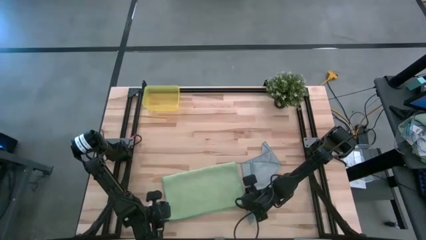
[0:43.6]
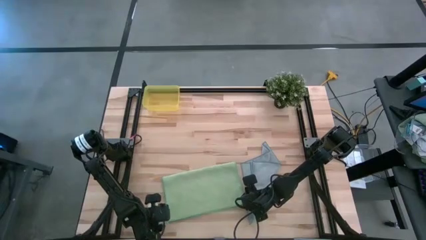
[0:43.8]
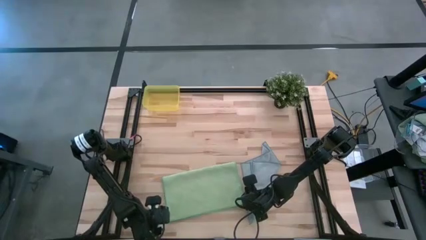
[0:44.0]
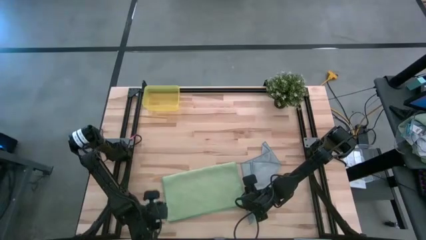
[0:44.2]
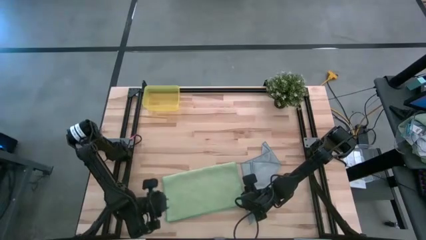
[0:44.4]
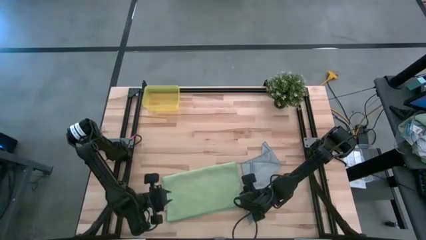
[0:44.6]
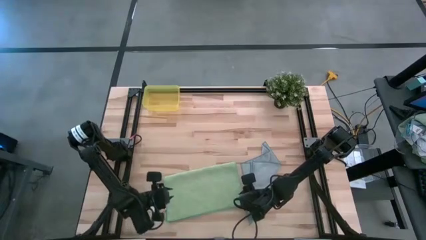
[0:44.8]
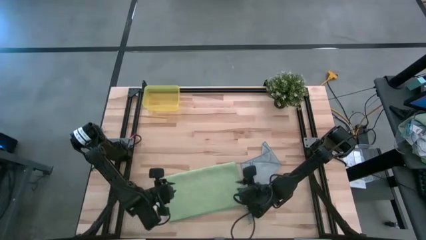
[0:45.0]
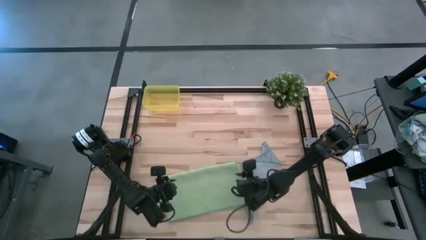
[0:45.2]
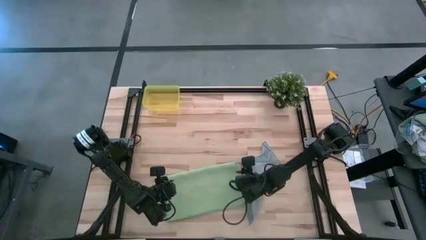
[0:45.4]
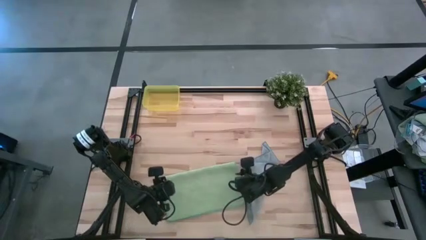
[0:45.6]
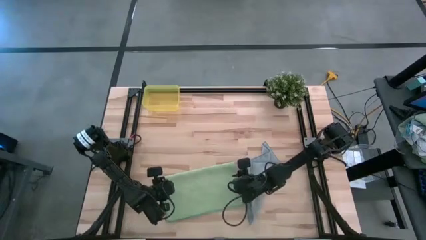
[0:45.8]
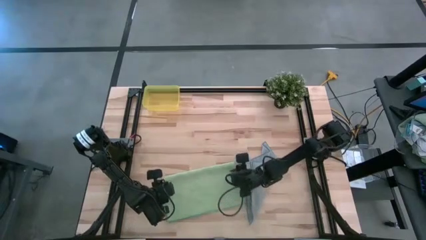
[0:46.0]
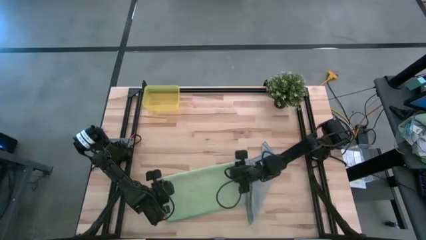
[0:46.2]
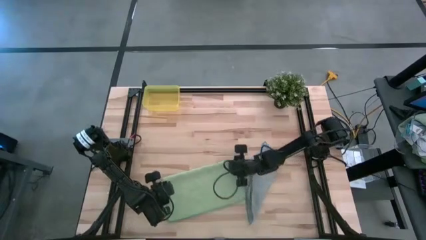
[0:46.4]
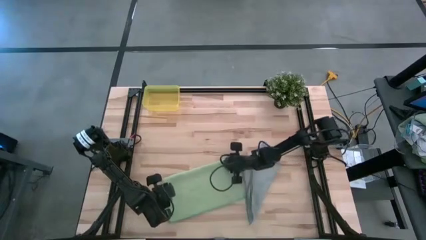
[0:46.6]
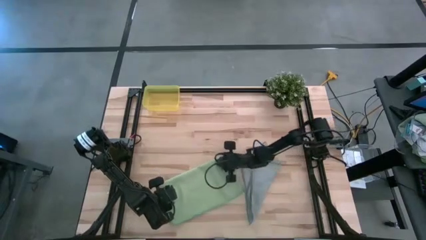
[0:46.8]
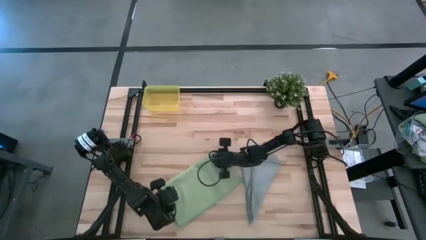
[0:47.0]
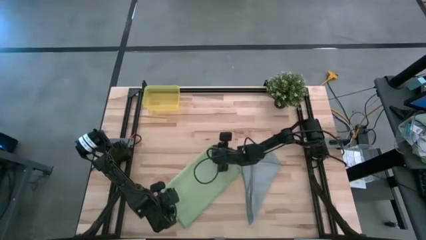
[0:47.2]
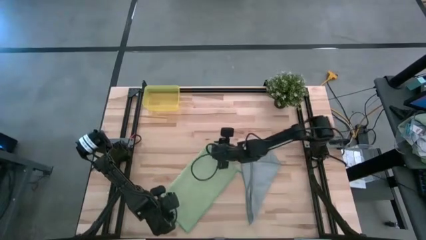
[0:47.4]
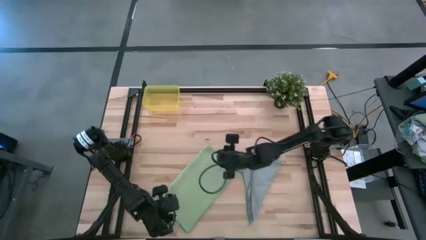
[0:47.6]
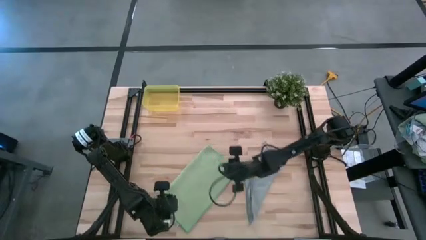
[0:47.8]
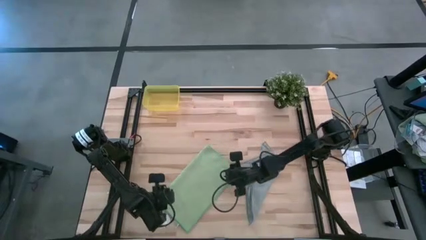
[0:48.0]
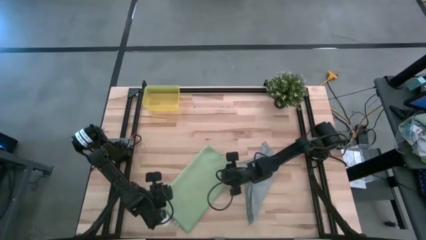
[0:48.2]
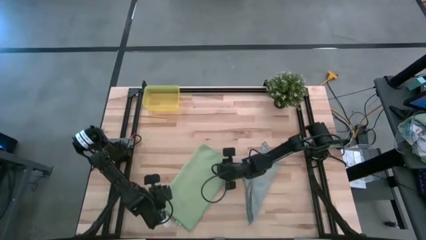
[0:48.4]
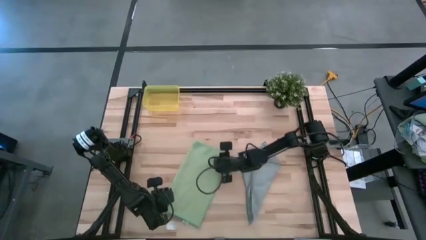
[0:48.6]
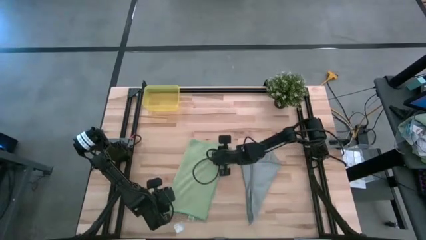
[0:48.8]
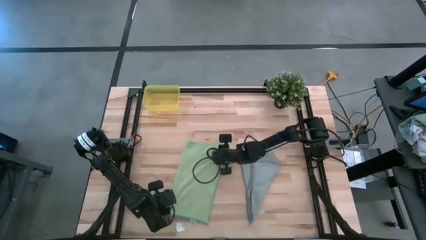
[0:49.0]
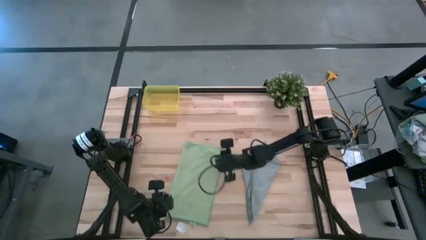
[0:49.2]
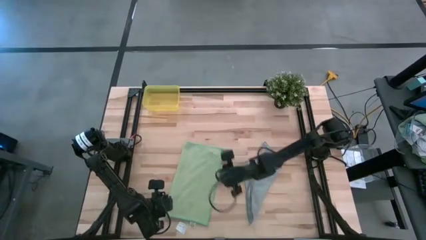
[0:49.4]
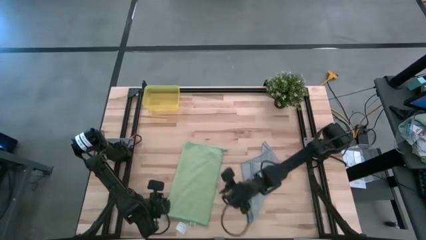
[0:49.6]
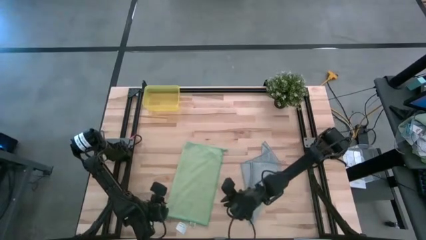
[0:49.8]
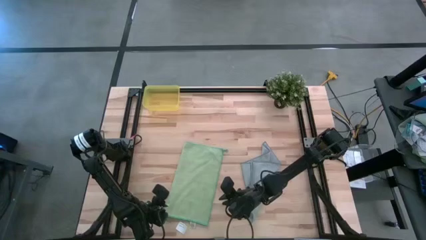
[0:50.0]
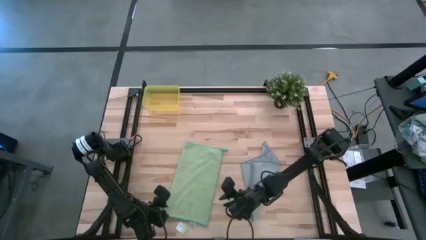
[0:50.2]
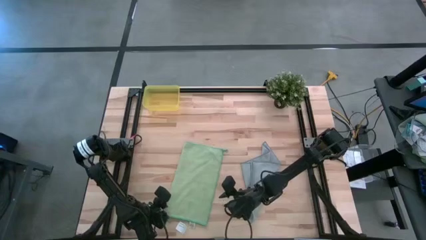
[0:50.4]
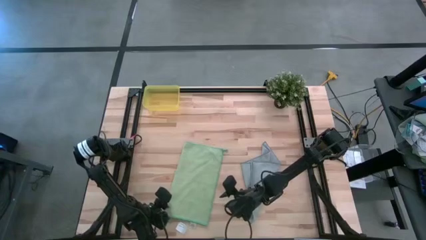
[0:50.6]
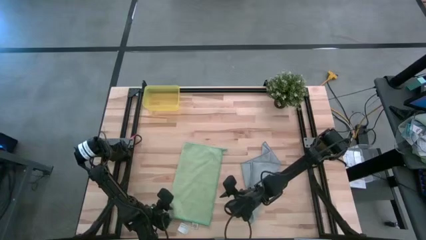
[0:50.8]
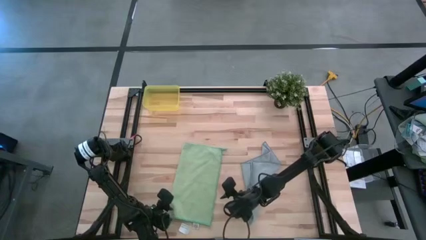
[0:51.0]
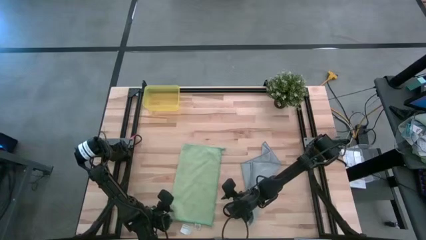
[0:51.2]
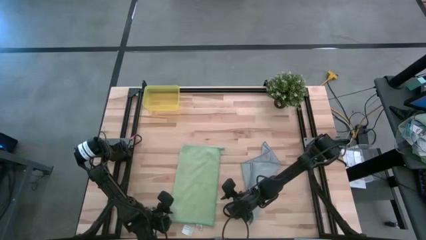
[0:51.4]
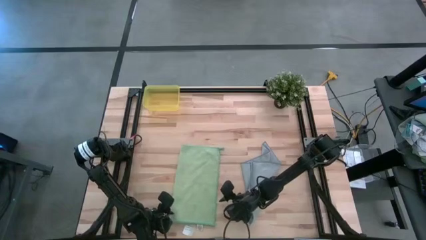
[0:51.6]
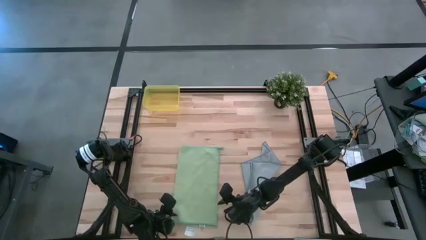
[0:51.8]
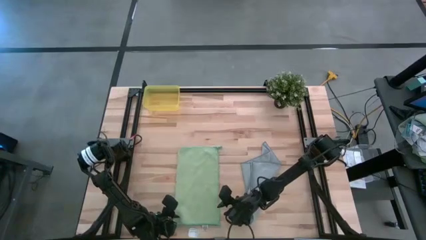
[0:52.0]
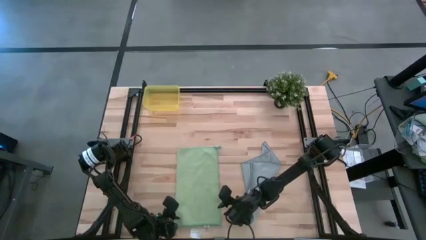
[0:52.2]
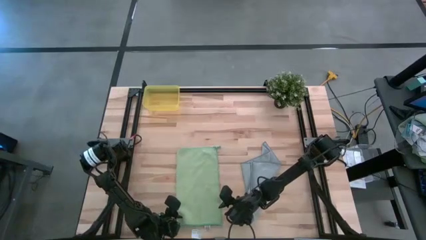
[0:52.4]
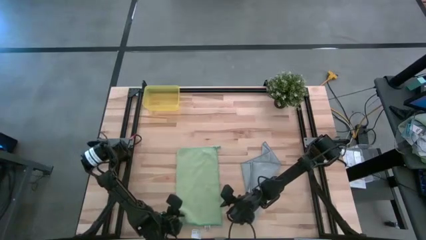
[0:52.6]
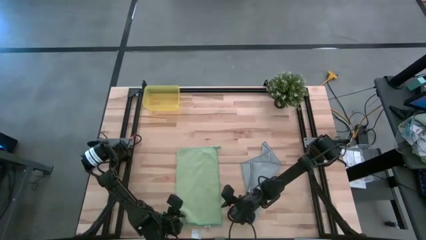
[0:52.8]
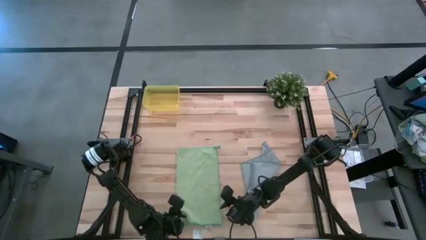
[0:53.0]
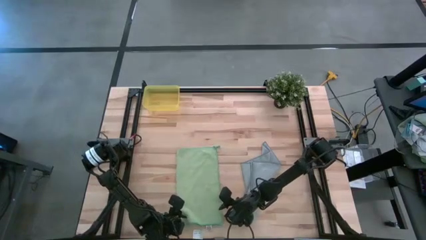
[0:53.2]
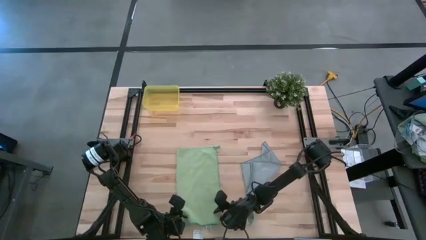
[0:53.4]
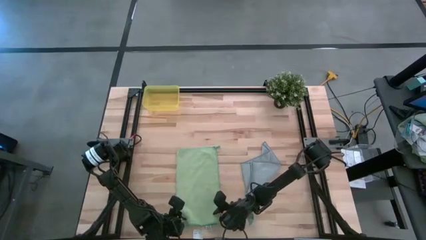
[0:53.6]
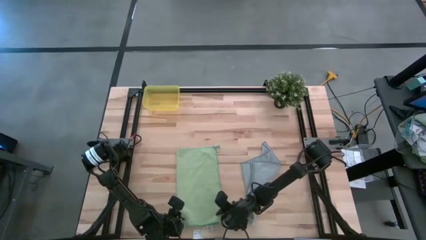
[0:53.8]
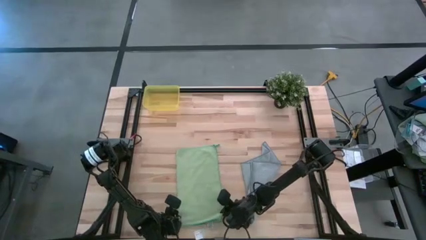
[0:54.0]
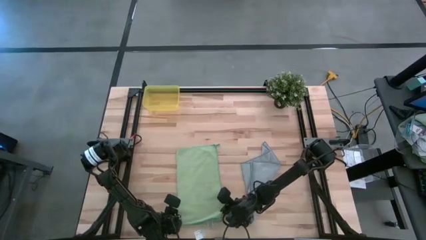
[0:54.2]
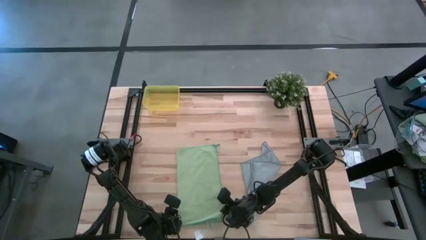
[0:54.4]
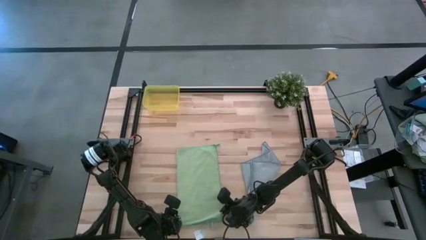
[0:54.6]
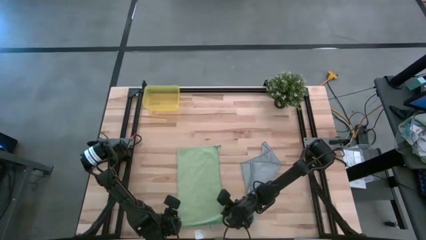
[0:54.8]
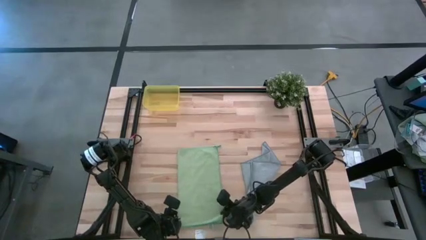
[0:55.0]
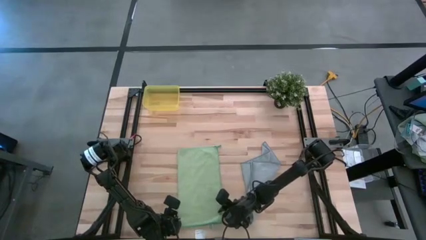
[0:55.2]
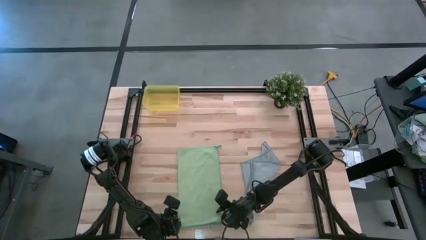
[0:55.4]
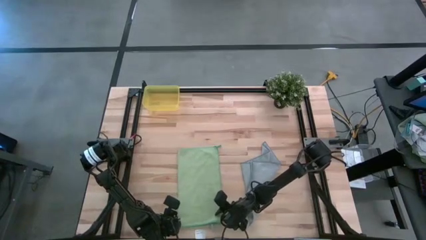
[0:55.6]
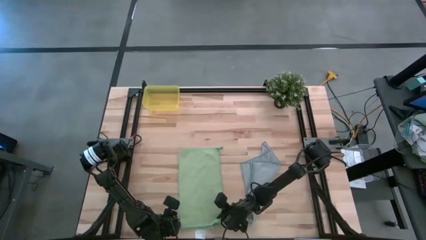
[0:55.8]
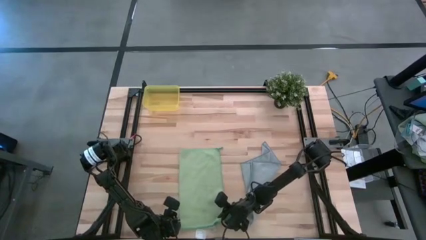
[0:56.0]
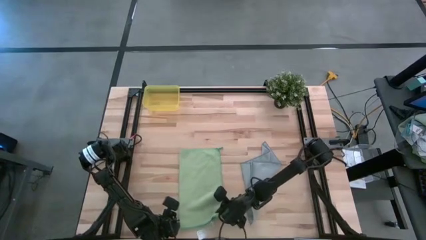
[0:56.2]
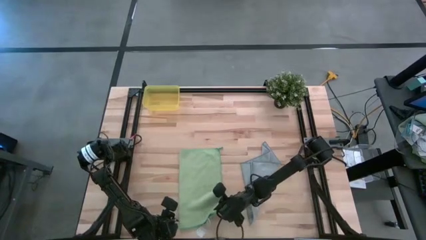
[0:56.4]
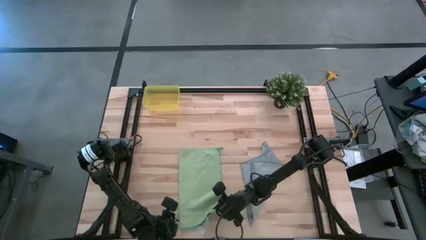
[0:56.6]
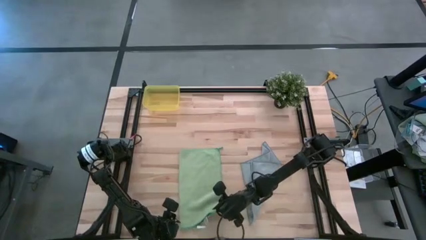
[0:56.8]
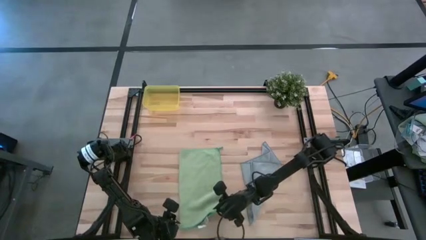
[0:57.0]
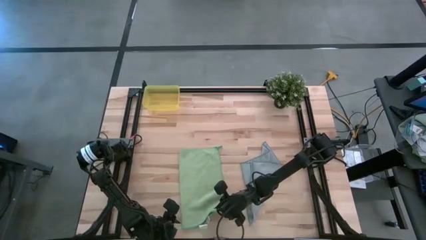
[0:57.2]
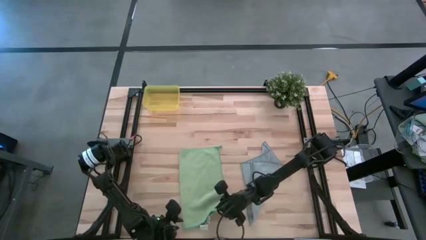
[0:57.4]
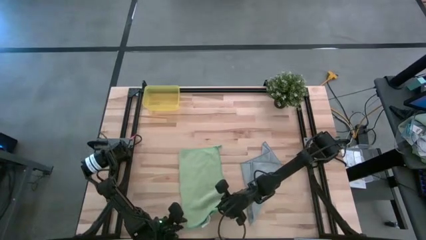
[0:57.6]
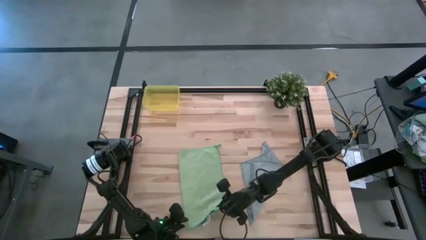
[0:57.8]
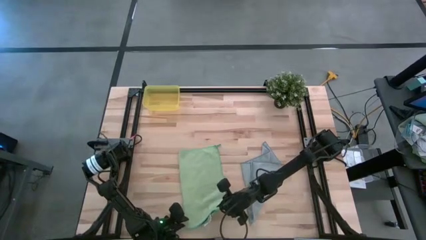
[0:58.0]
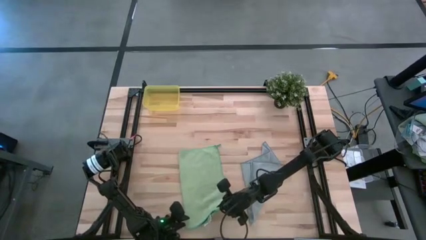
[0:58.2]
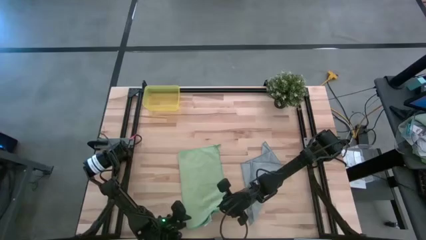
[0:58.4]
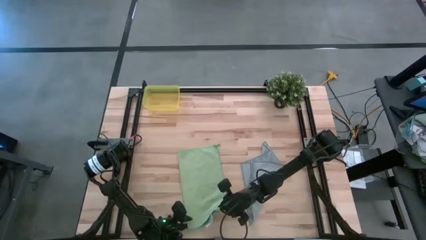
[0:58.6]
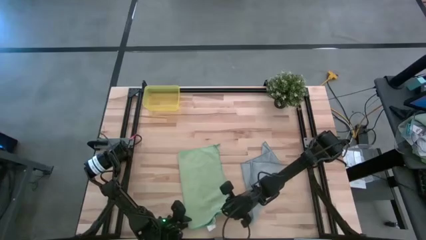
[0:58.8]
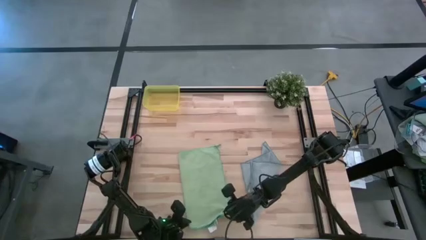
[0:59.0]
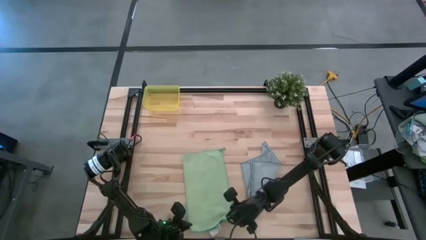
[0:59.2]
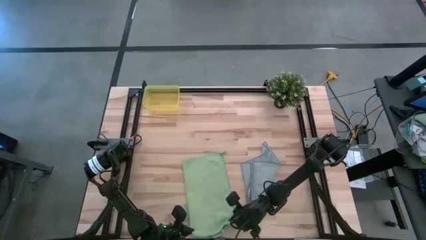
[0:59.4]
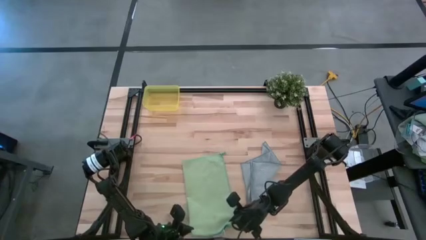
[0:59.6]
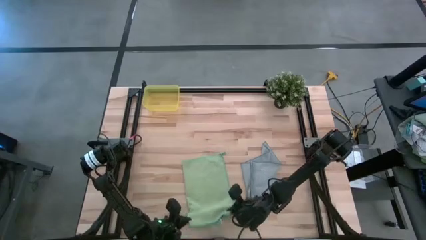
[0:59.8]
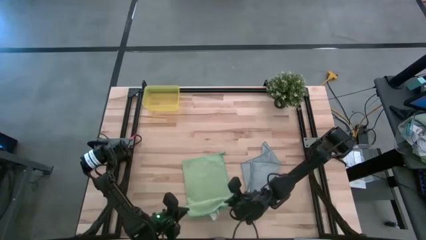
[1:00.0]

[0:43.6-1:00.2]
Task: Roll microfiber towels into tight, uniform cylinder then place into a basket
Roll the green towel
